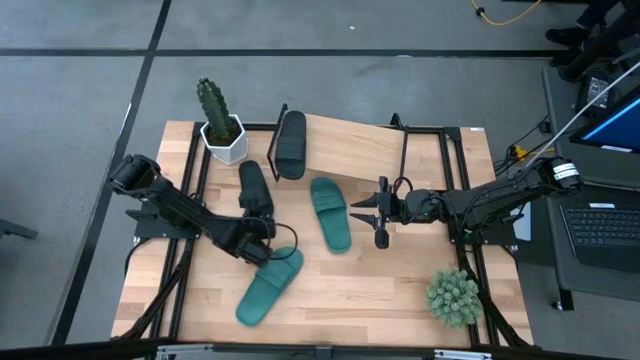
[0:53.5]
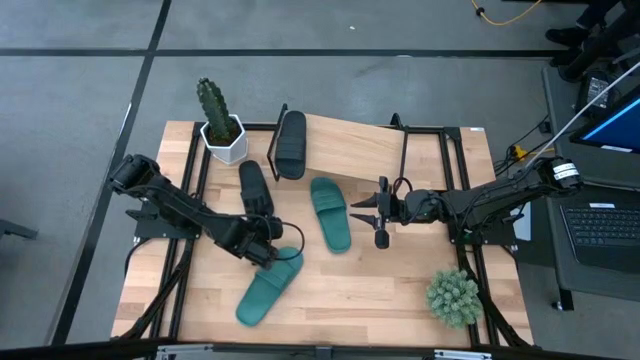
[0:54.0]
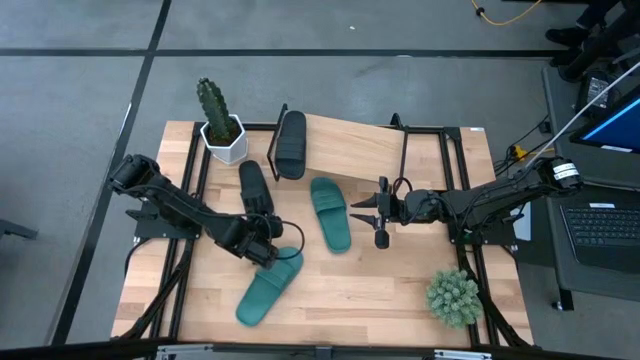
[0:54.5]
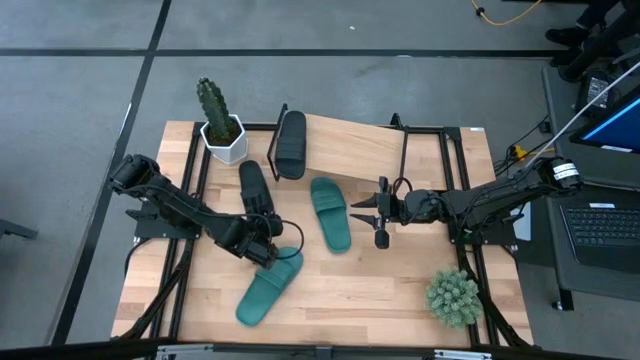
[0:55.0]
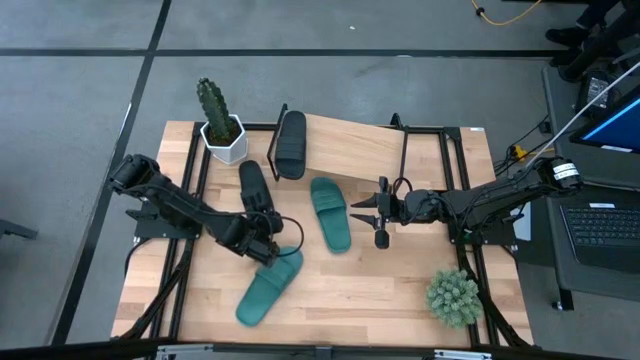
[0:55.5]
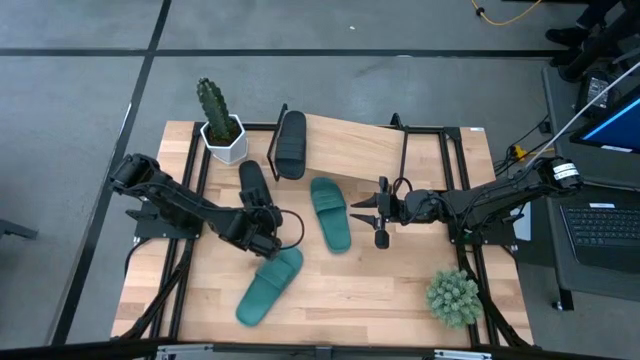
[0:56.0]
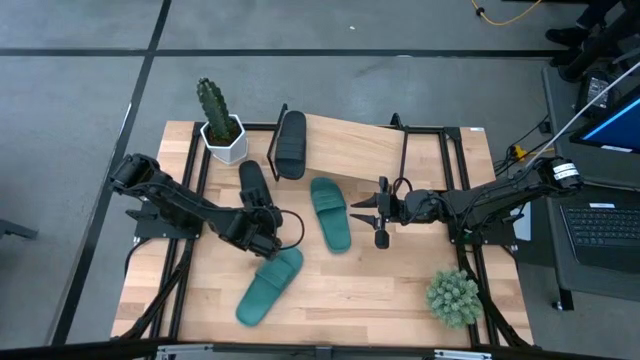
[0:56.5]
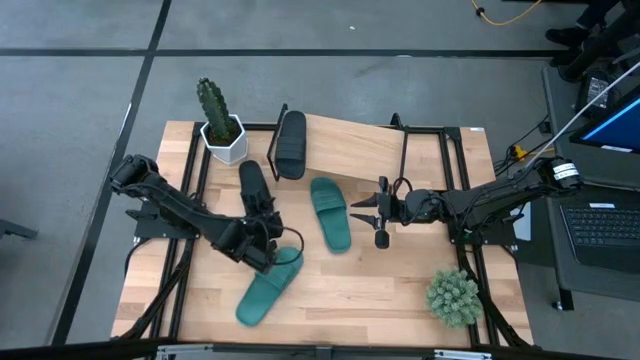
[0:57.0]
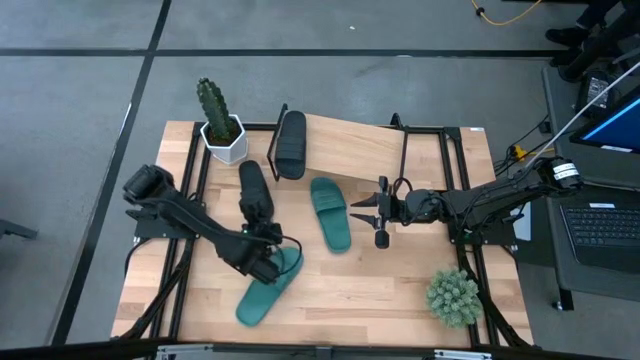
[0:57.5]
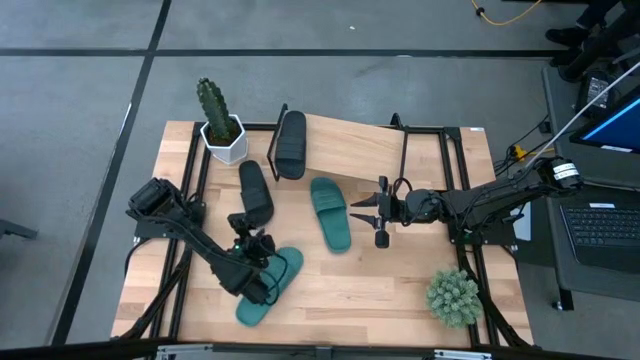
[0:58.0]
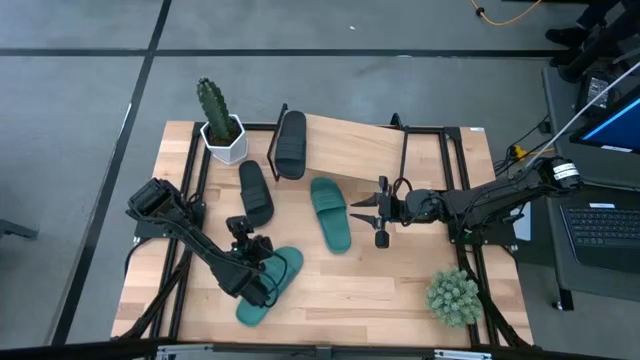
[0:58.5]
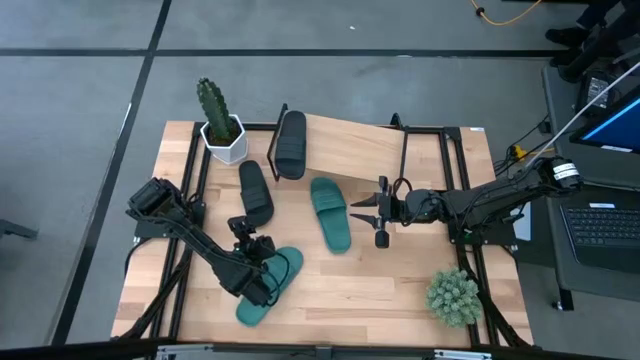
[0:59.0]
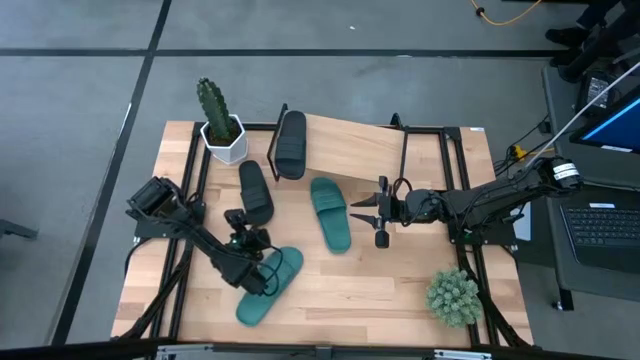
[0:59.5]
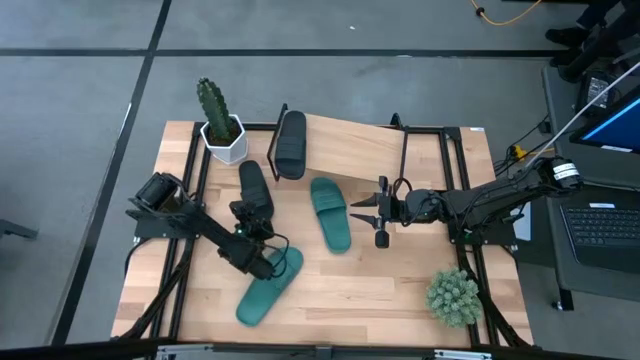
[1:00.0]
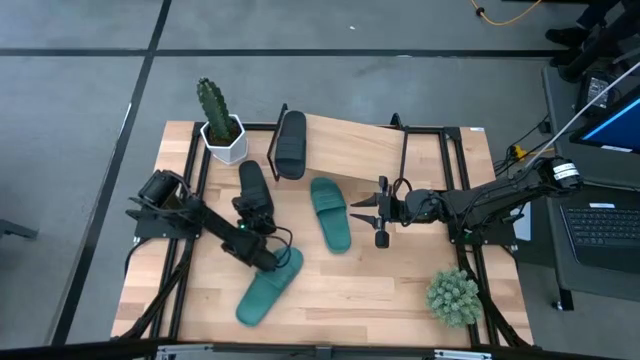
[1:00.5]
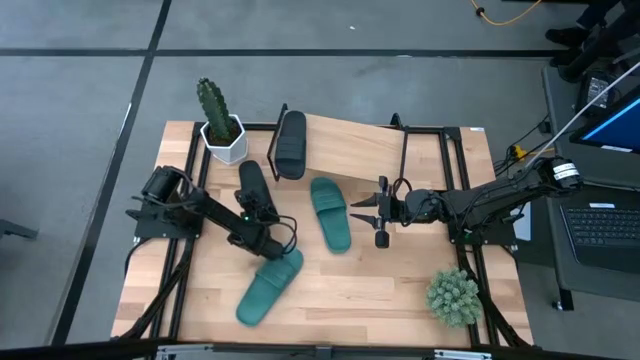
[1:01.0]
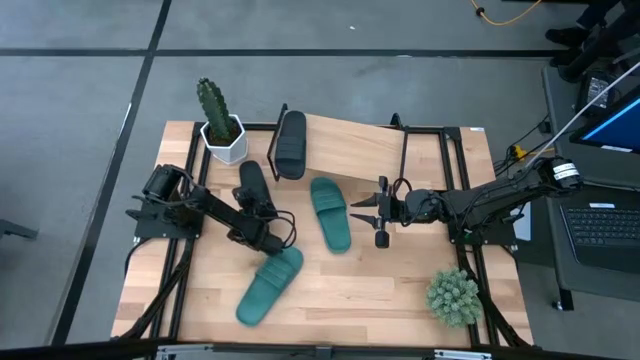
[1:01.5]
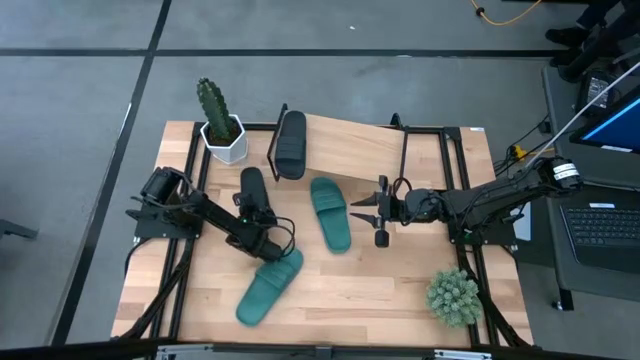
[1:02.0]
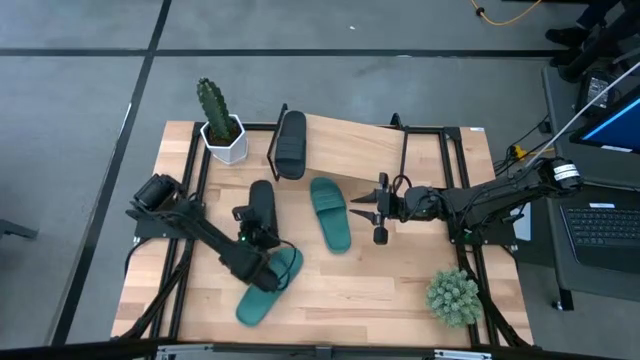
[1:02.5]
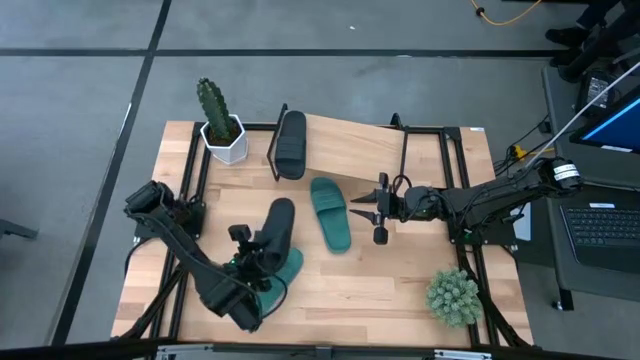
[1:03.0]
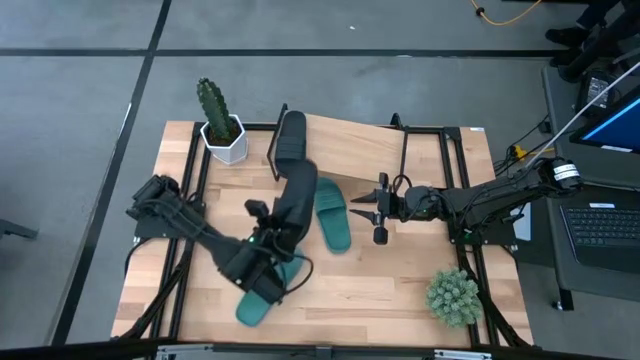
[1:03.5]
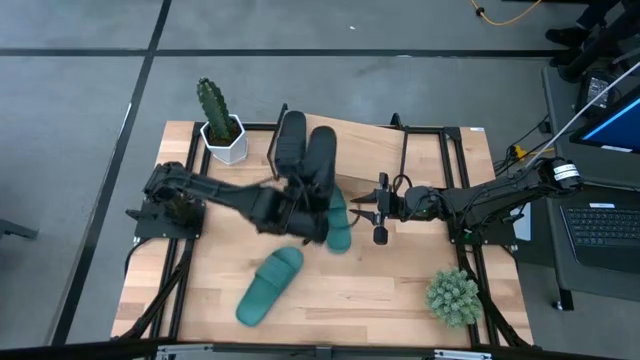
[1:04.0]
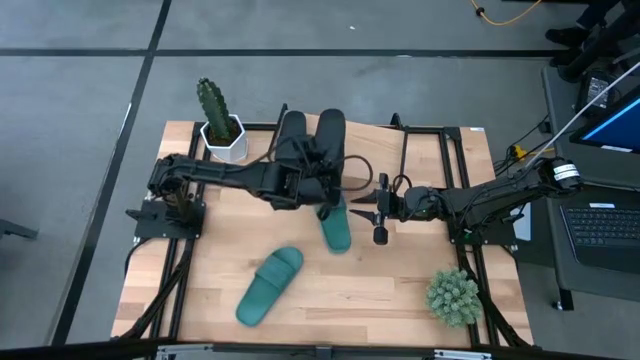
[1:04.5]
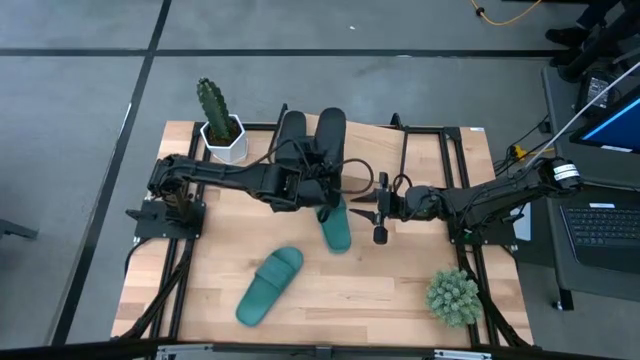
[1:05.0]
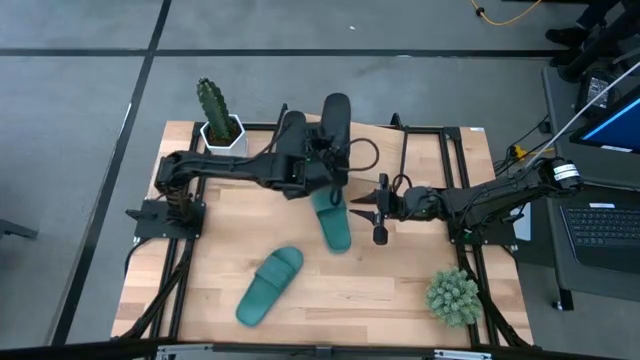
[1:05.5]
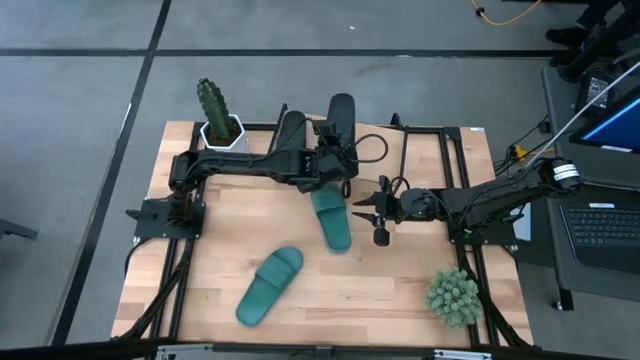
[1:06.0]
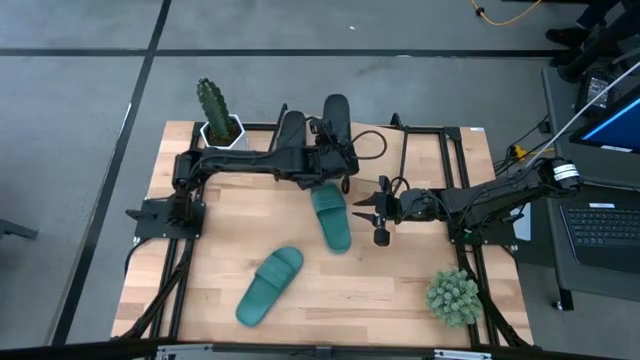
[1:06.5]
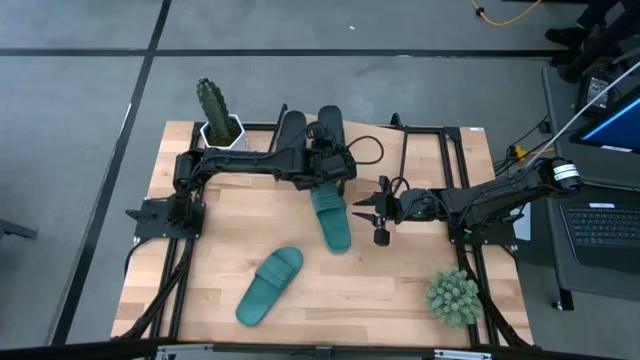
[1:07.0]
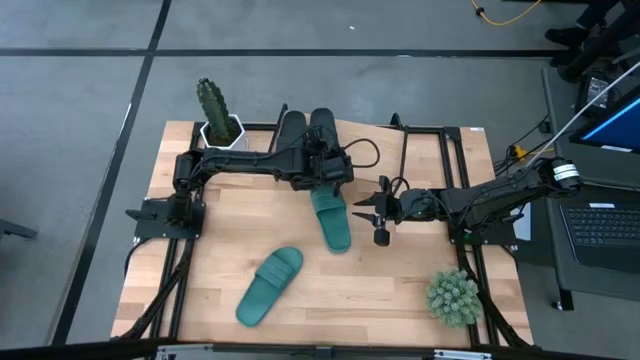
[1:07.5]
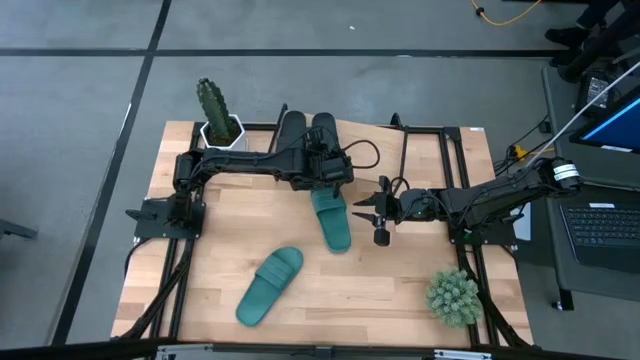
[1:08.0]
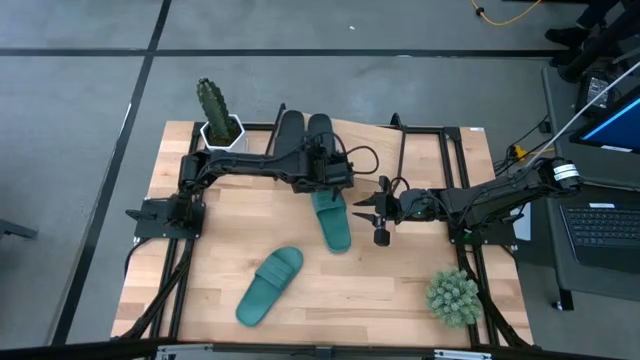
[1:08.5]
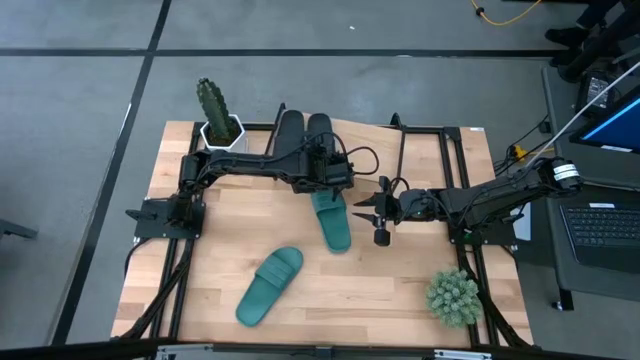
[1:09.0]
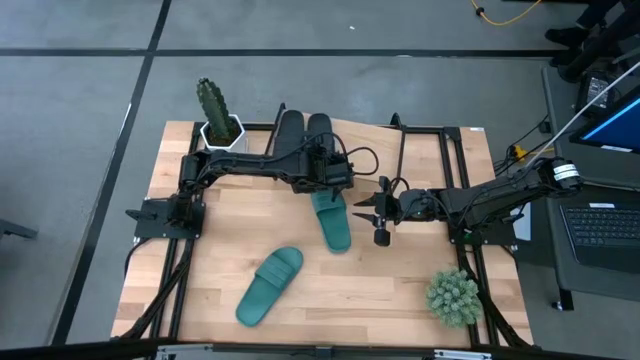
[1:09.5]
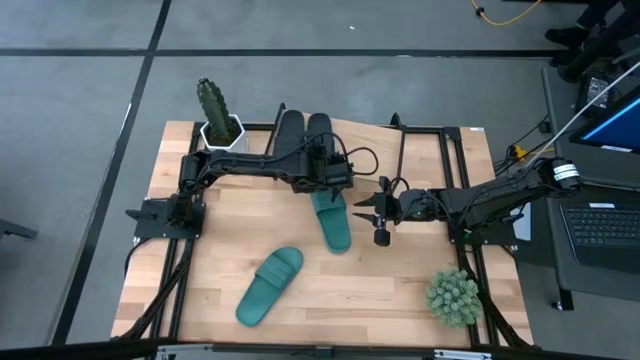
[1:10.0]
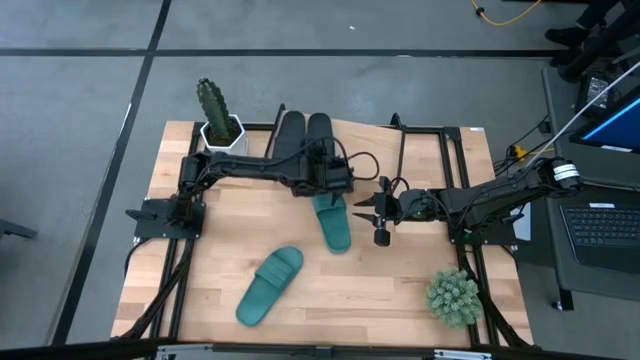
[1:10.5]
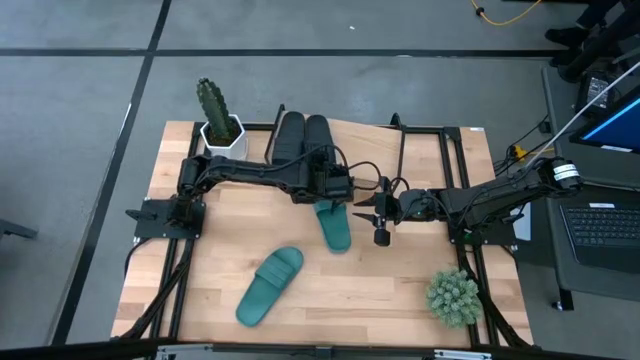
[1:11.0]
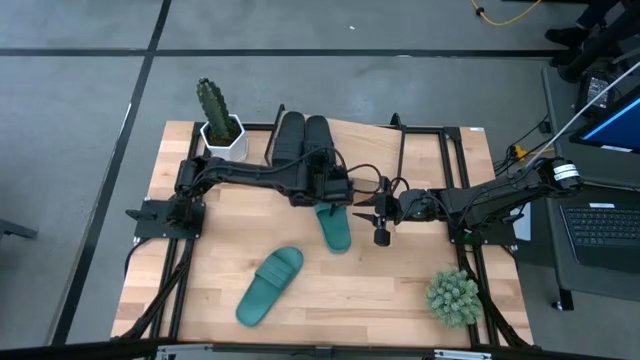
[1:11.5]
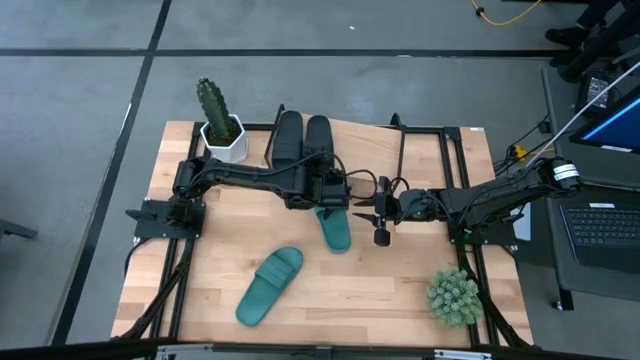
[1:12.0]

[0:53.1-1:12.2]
Task: Pick and place slides into the shelf
Put the black slide on the shelf

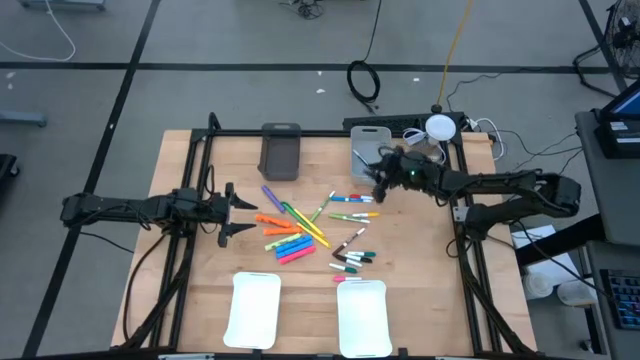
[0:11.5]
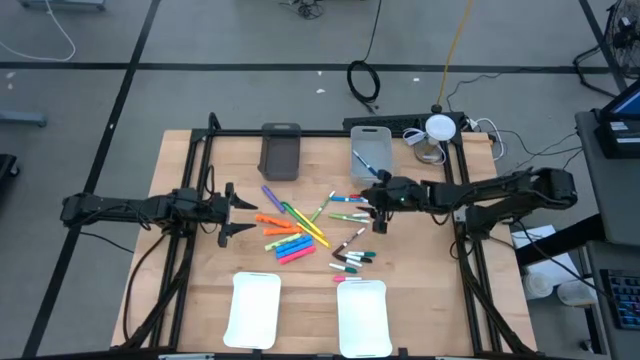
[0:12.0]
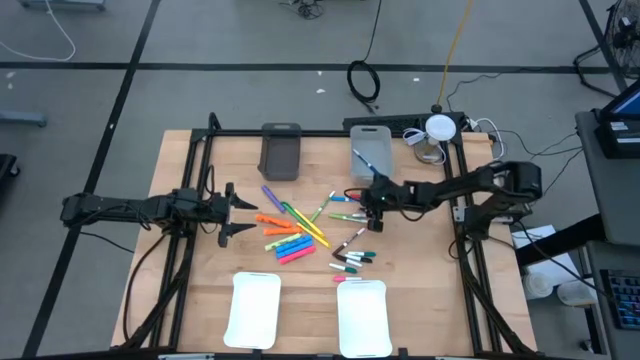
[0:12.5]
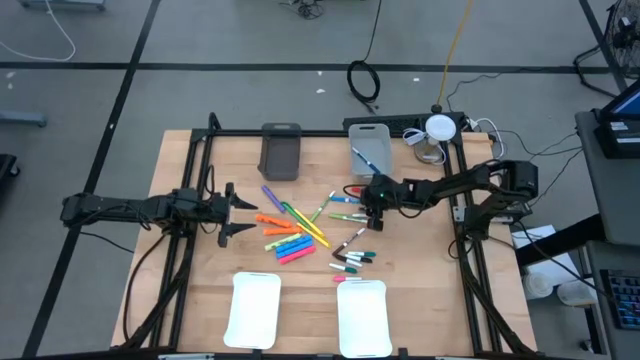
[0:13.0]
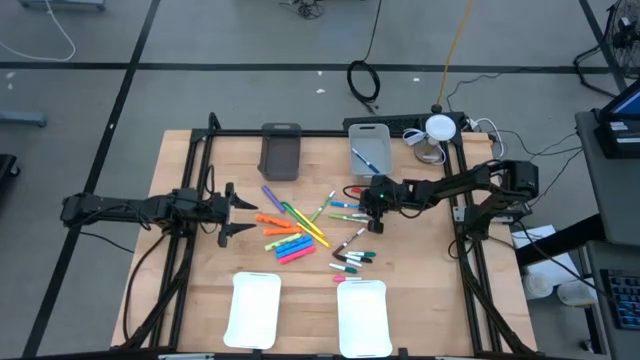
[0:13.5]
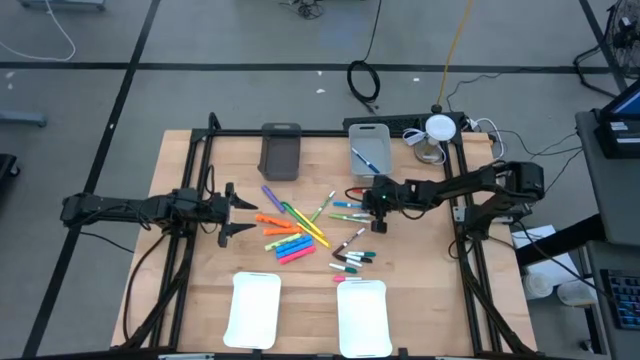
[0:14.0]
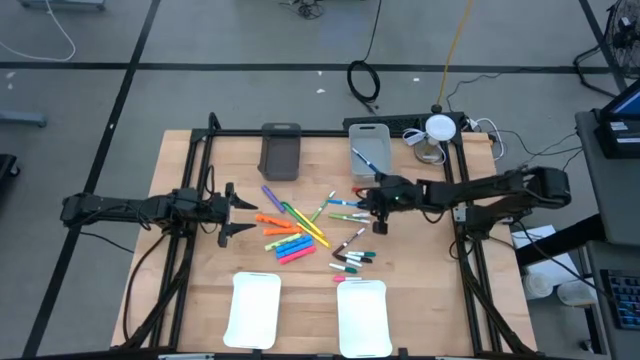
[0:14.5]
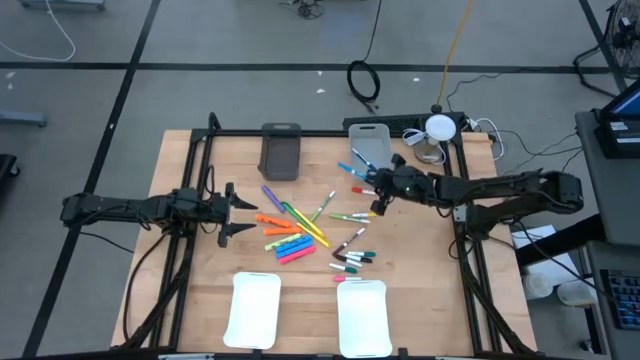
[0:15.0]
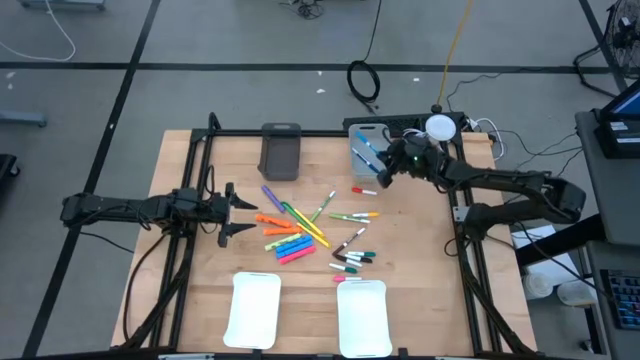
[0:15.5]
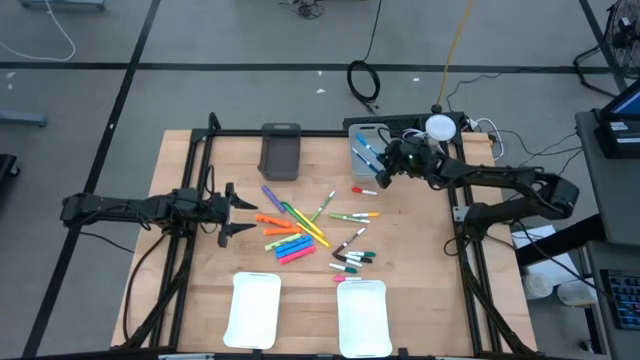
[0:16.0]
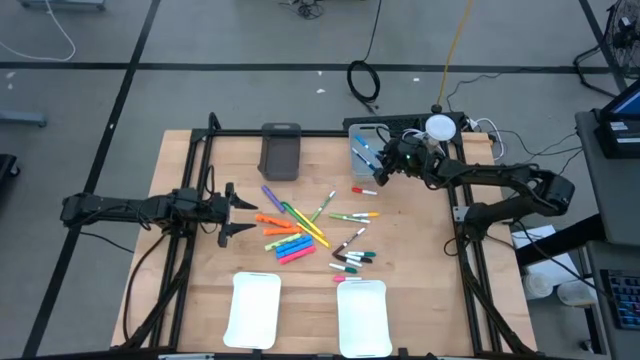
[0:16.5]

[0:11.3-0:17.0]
Task: Pick & Place Markers
Put the light blue marker pen into the gray bin
